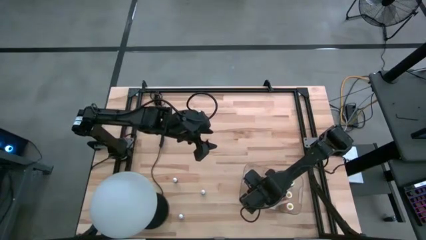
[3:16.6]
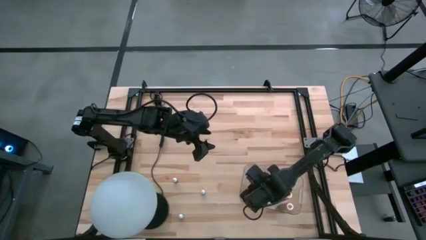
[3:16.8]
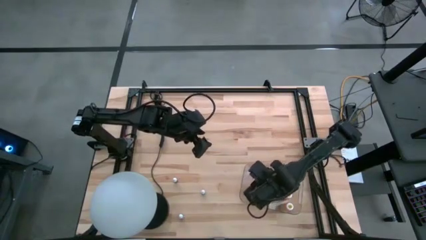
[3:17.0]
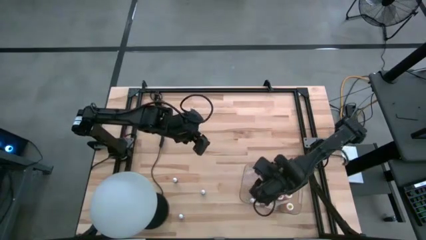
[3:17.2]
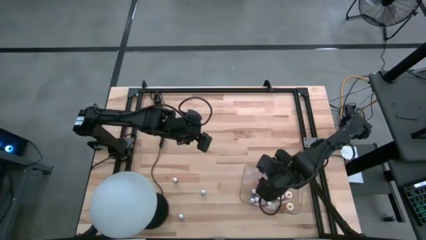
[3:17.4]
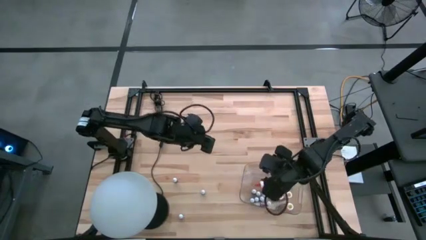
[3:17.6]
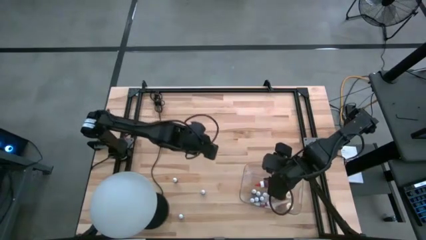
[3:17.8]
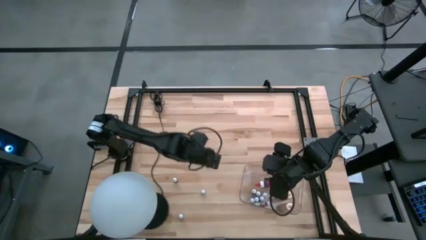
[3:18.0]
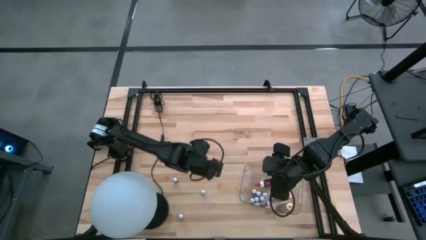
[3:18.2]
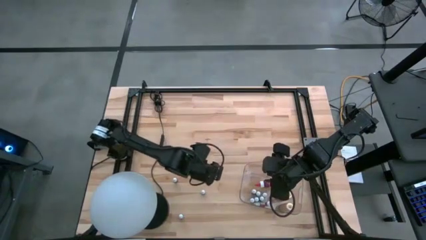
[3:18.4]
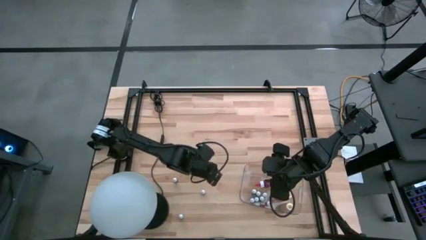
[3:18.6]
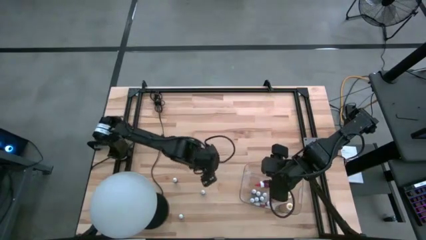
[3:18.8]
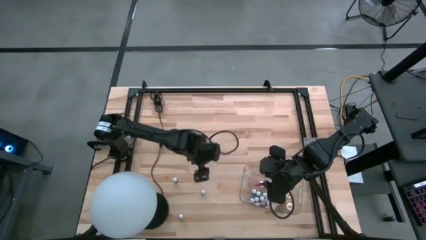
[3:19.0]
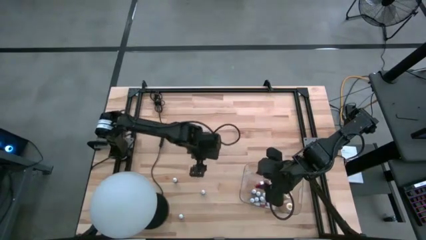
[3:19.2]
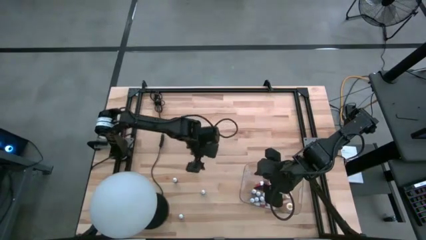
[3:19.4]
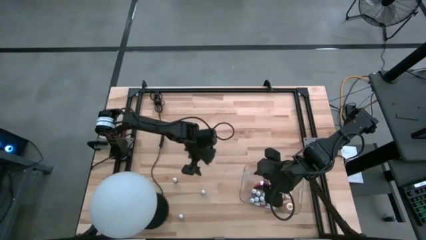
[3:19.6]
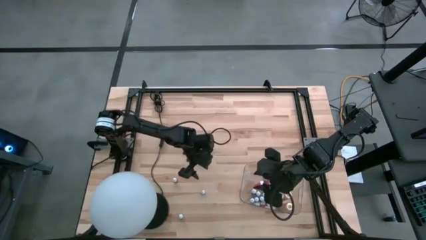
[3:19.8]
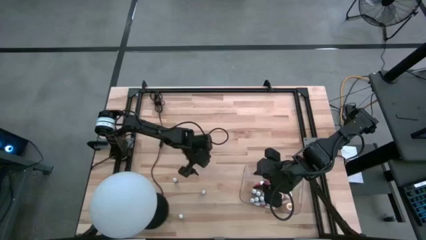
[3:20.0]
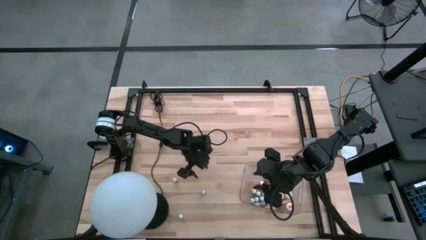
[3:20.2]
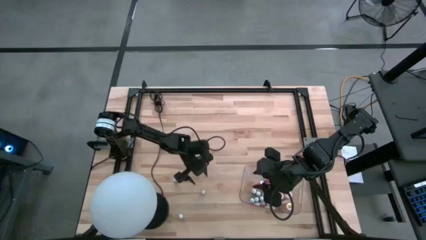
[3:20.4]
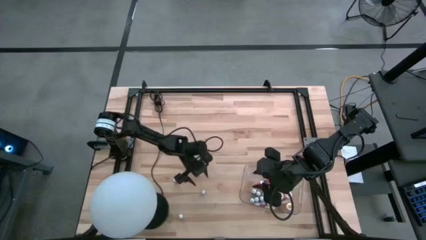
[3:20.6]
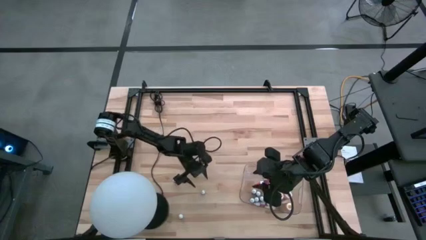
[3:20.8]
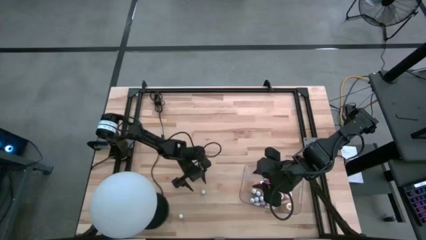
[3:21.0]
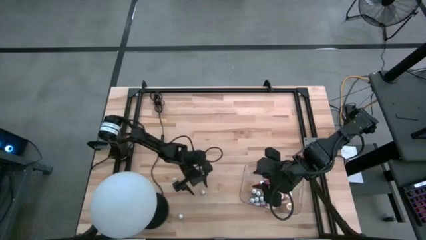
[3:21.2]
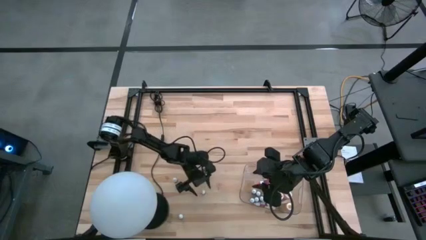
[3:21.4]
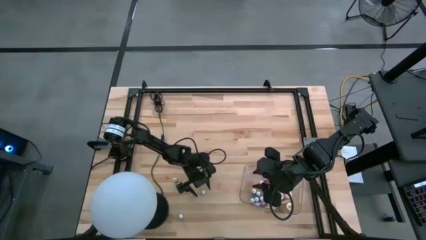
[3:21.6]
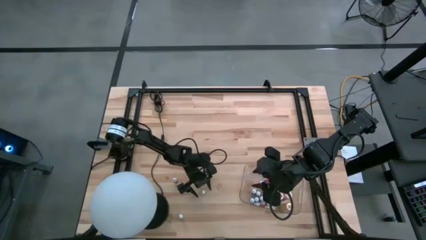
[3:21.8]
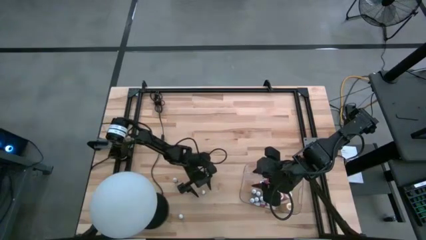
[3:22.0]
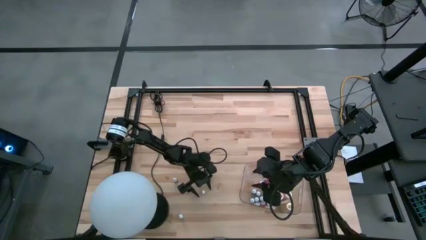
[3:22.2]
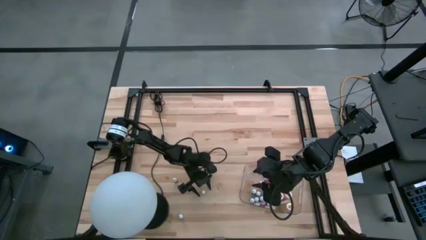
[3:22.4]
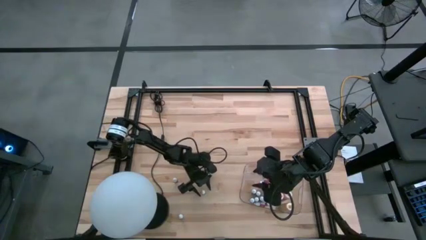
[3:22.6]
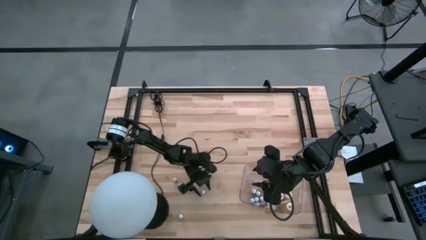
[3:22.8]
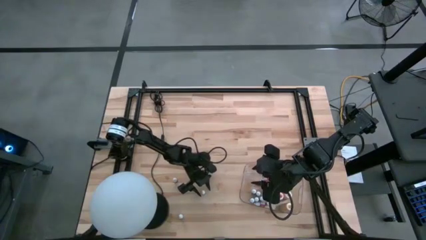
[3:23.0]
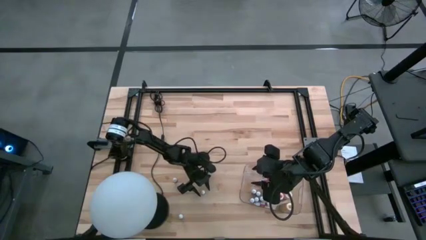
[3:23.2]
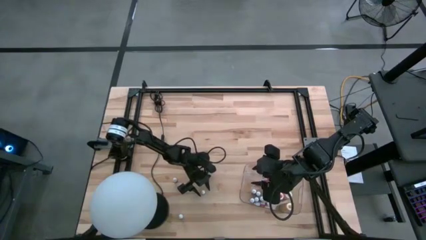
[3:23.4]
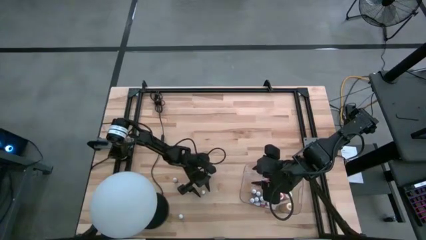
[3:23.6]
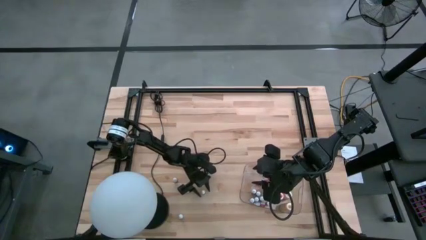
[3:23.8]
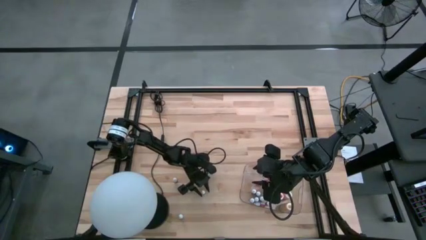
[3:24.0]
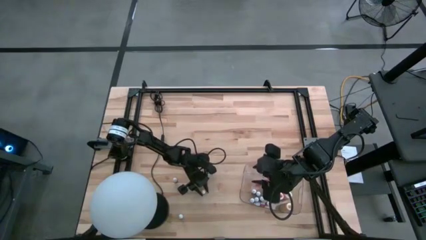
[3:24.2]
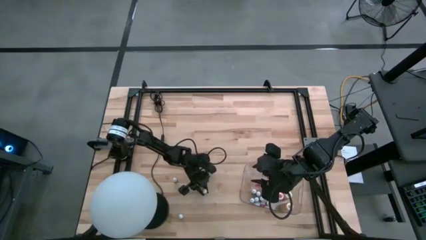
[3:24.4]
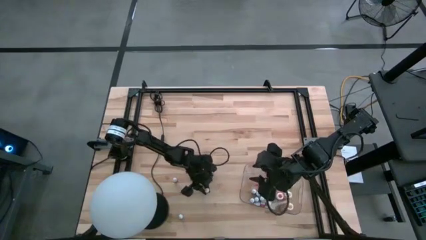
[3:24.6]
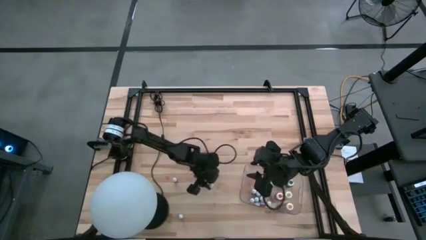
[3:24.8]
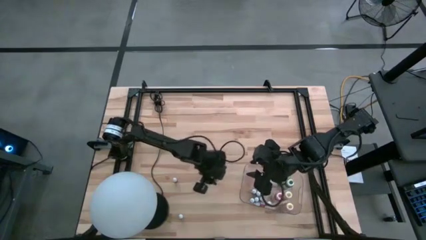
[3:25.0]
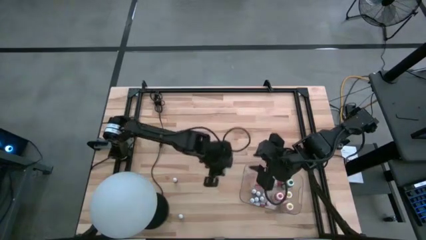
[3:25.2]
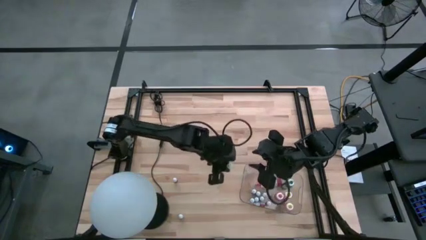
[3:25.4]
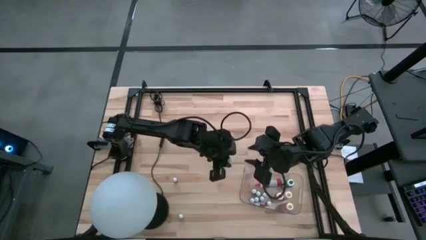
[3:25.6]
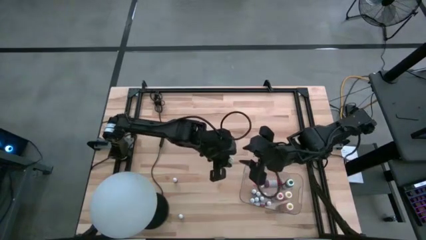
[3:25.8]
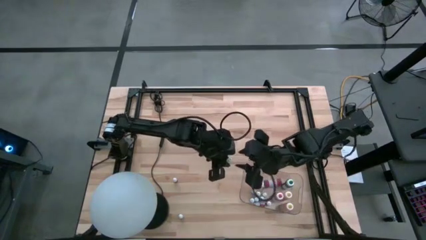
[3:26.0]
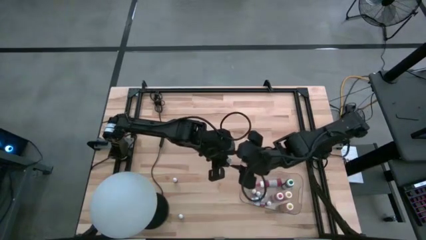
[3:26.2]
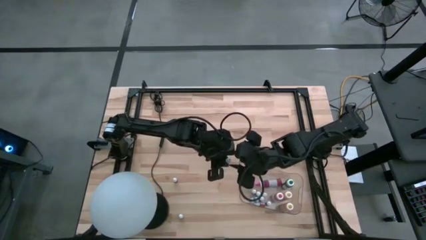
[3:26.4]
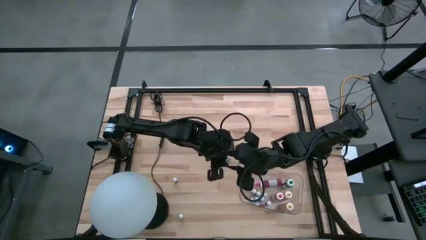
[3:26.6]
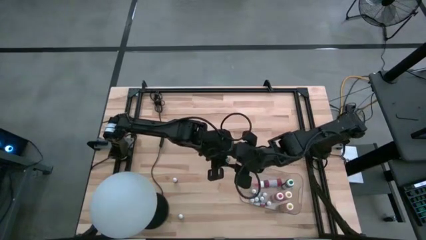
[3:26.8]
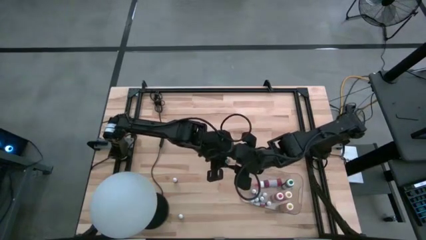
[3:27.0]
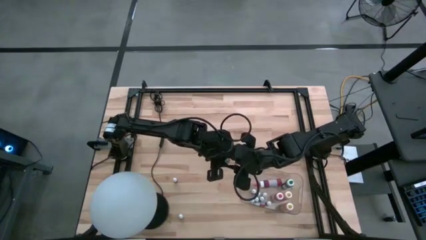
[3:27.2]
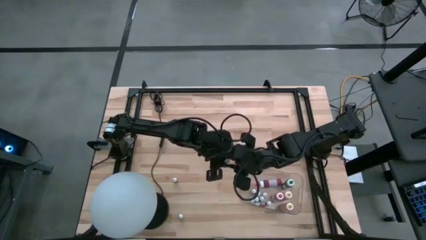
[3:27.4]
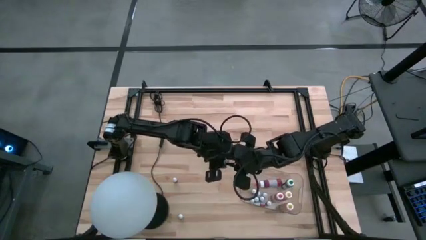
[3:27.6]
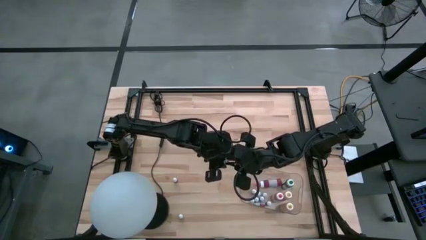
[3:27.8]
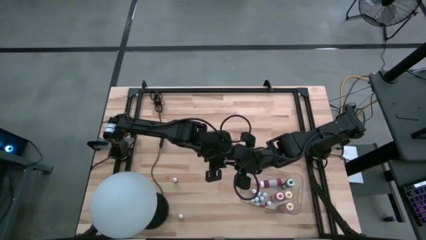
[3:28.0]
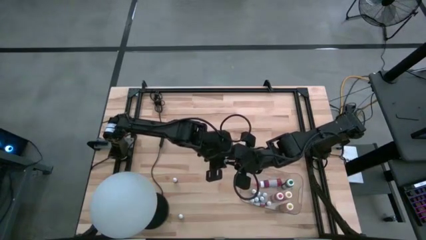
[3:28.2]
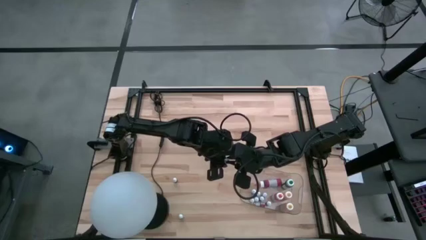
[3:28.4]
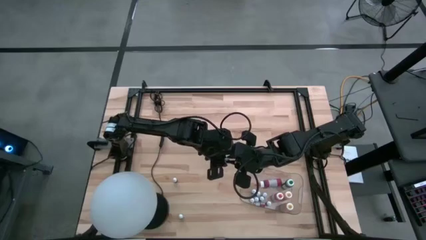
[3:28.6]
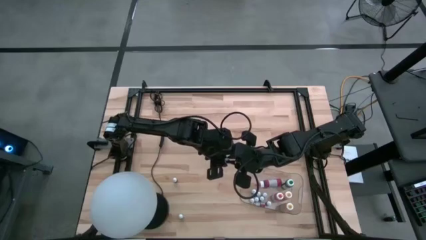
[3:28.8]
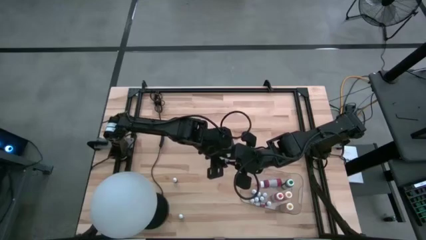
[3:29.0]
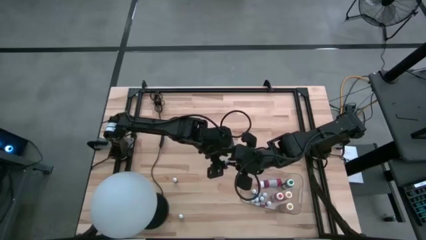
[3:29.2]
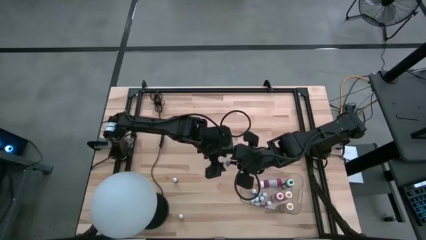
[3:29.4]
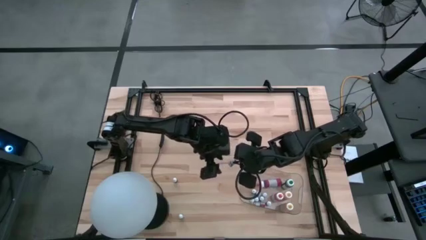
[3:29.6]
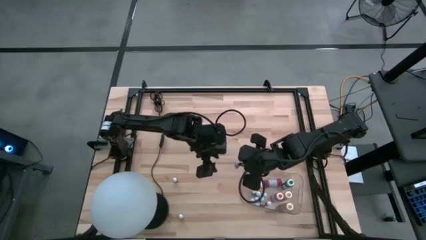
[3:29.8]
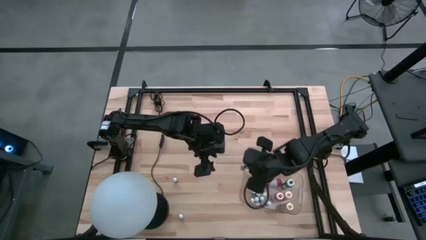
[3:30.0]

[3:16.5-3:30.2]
Task: Pick & Place food coloring
Put the red food color into the transparent bin

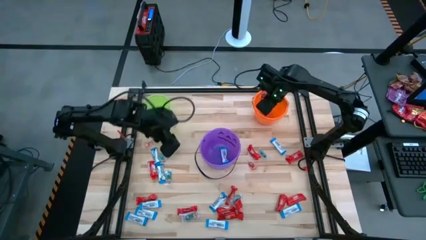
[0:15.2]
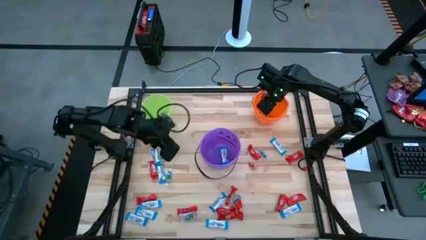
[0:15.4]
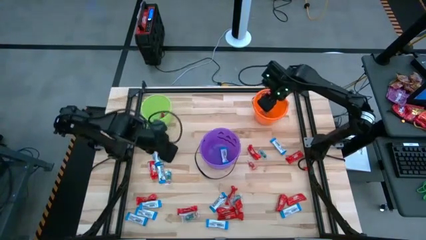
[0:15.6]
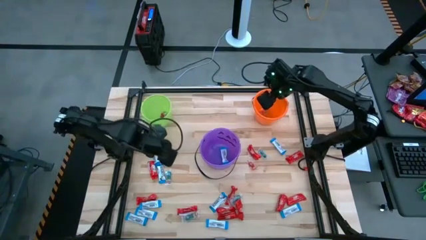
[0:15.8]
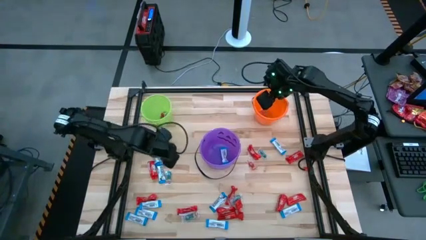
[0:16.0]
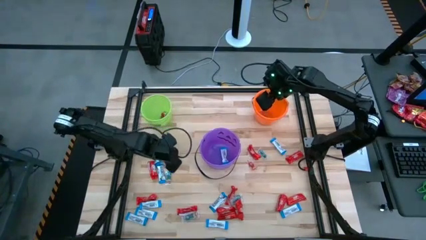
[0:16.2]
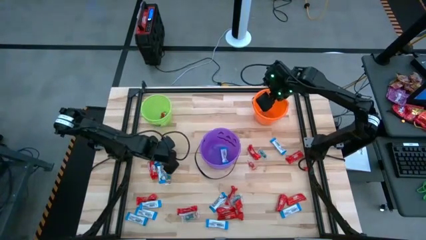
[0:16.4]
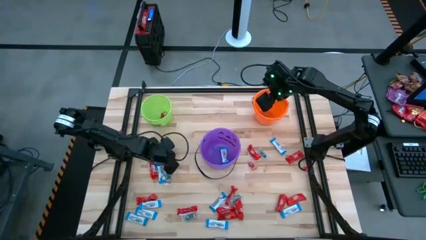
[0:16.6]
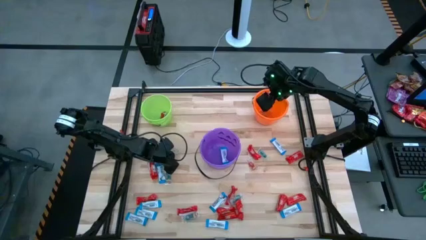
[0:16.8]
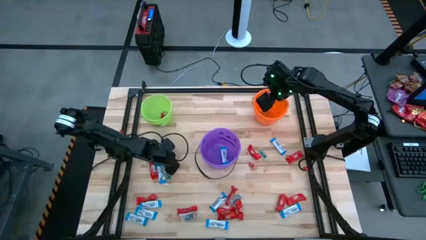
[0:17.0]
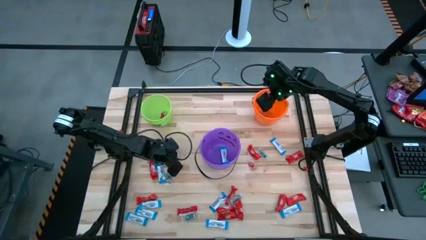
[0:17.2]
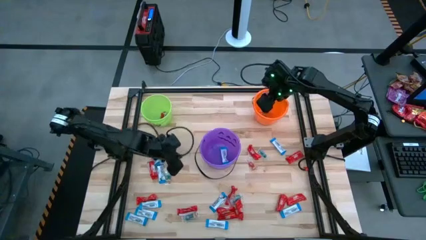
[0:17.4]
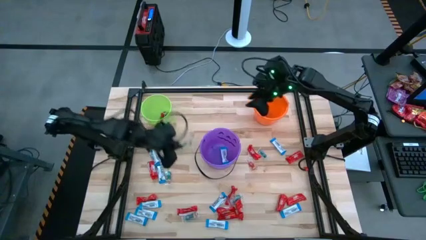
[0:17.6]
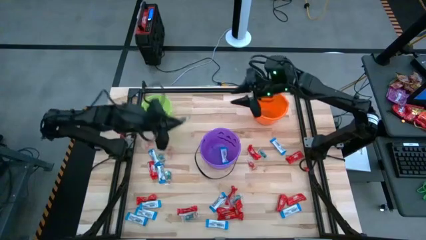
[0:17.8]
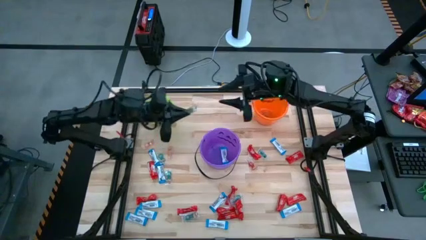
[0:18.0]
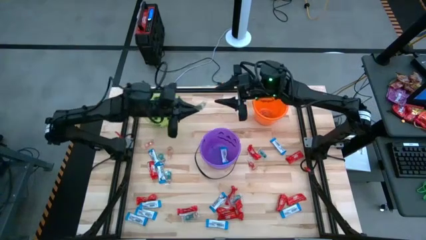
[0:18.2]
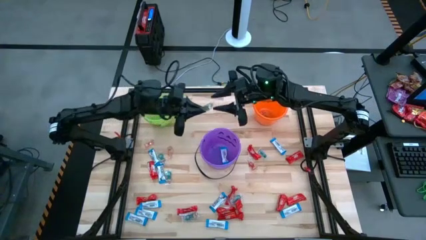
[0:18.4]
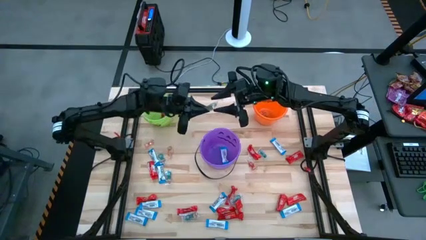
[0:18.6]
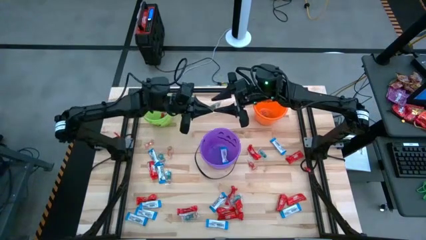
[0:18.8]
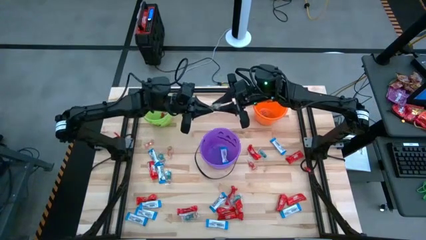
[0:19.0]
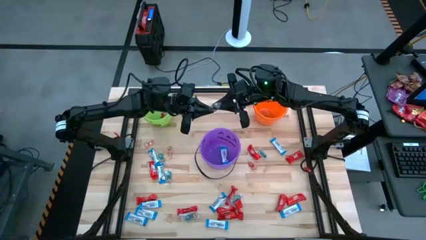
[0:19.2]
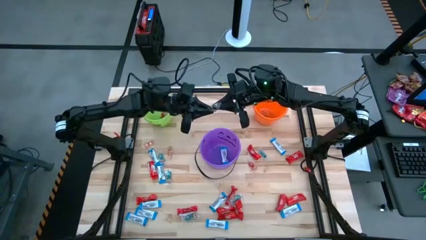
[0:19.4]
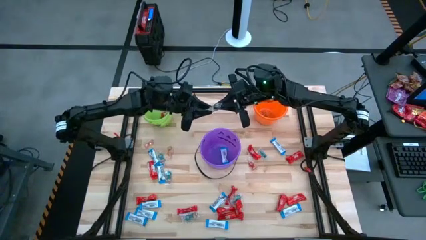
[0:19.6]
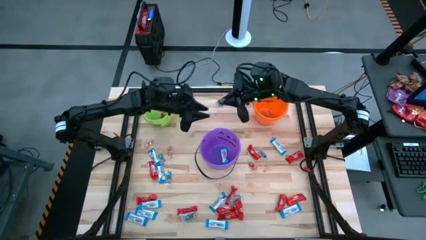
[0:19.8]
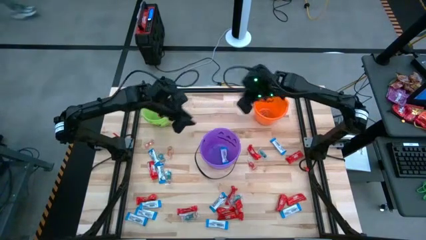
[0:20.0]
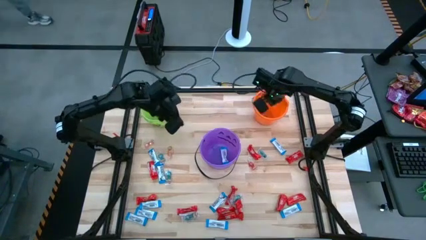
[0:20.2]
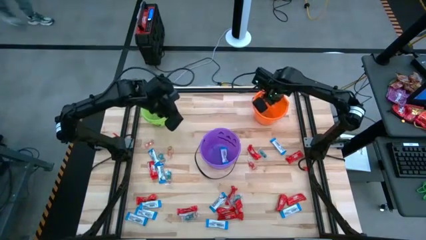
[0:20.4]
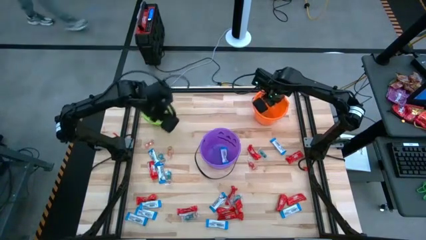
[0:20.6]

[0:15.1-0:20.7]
Task: Sort candy by brand, put in halloween buckets
Put the green gummy into the orange bucket
